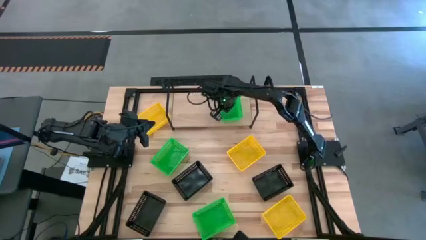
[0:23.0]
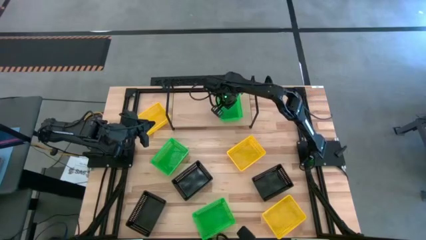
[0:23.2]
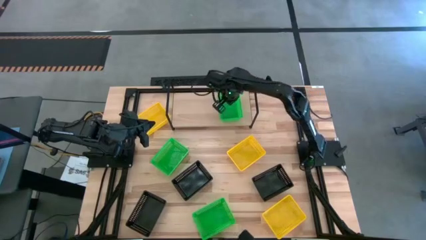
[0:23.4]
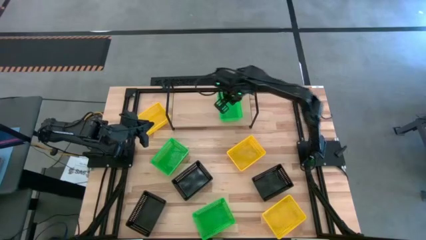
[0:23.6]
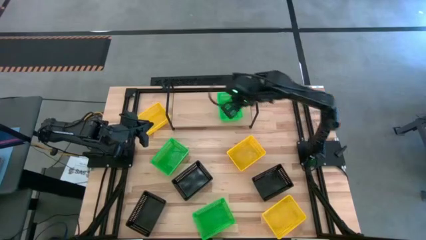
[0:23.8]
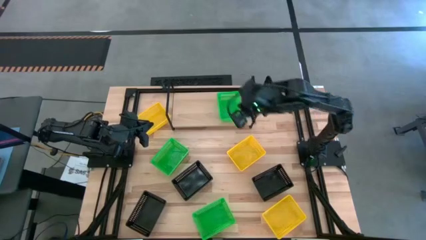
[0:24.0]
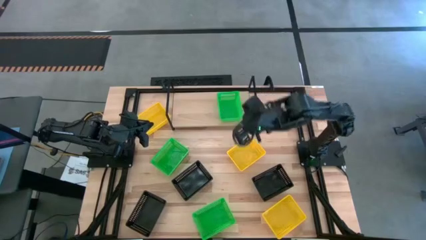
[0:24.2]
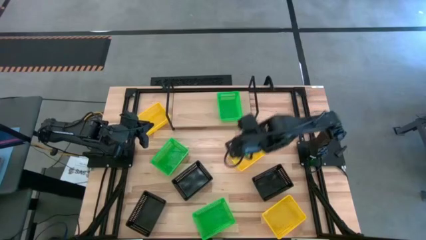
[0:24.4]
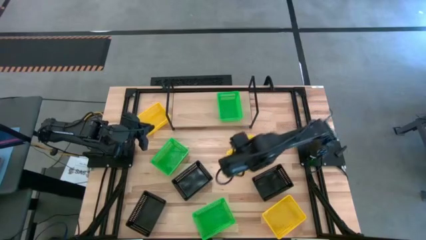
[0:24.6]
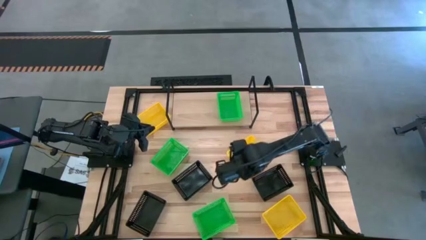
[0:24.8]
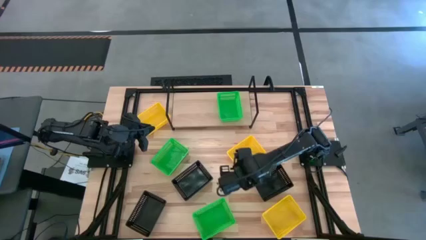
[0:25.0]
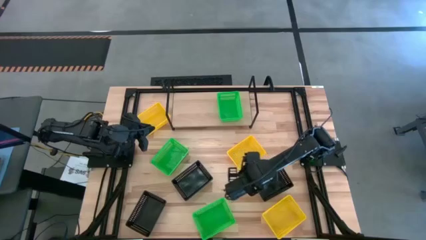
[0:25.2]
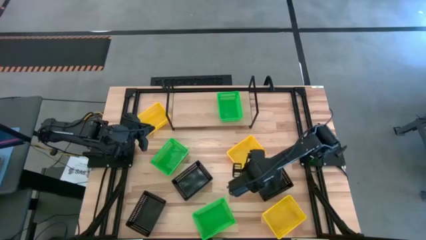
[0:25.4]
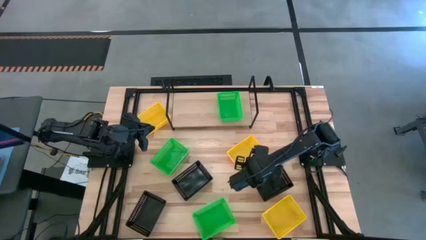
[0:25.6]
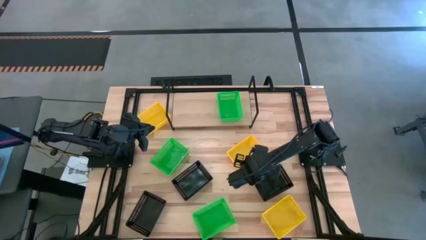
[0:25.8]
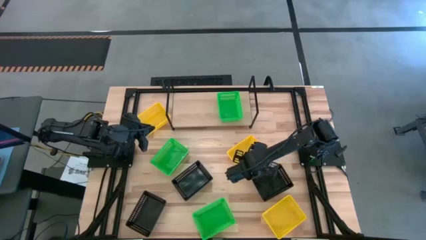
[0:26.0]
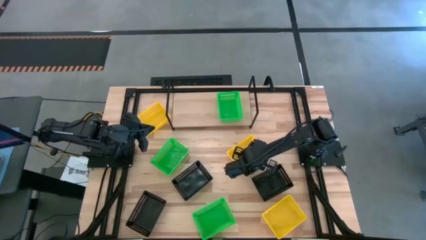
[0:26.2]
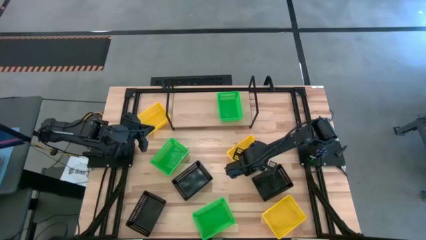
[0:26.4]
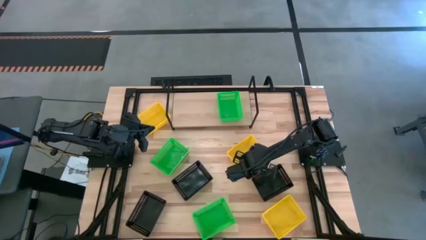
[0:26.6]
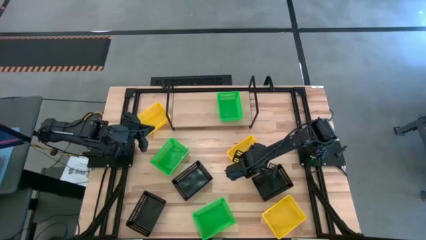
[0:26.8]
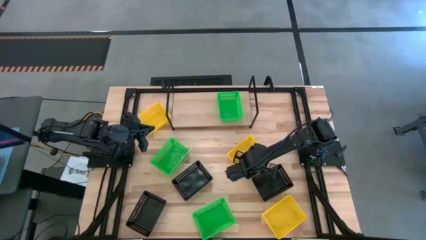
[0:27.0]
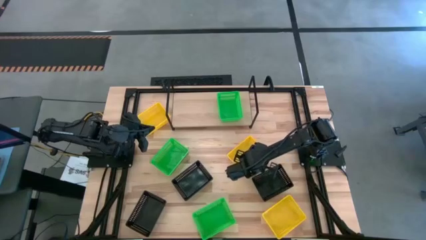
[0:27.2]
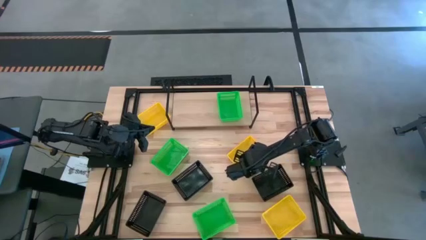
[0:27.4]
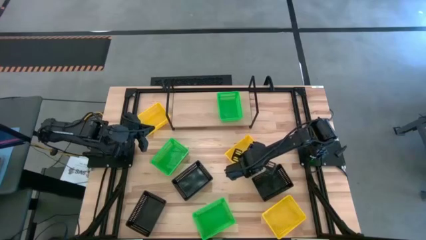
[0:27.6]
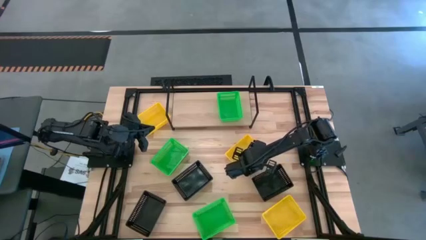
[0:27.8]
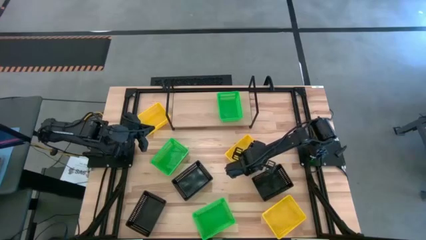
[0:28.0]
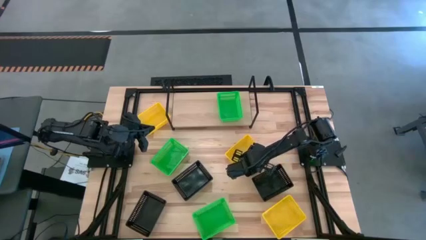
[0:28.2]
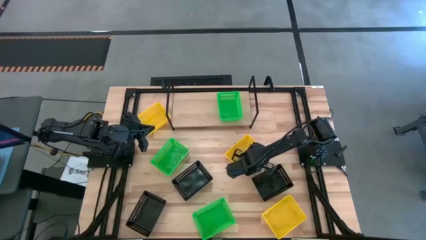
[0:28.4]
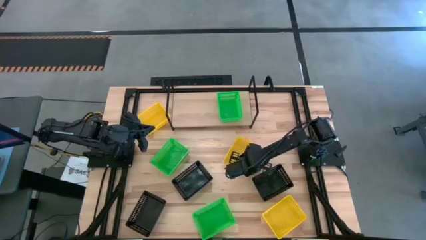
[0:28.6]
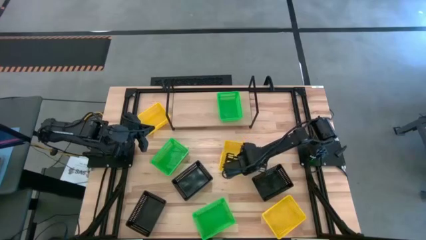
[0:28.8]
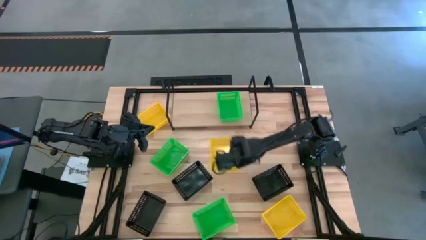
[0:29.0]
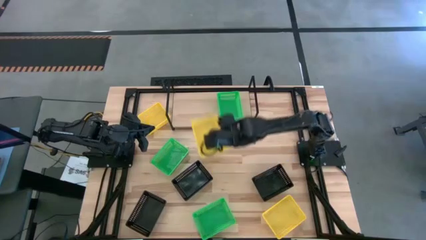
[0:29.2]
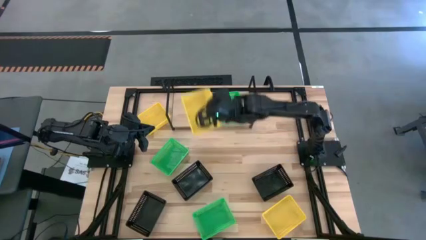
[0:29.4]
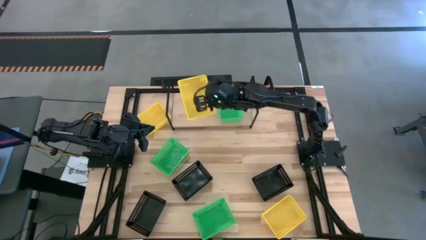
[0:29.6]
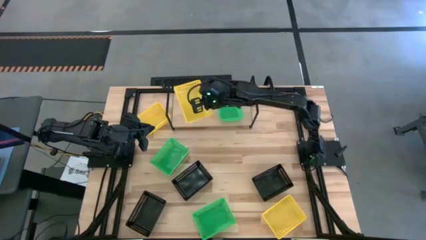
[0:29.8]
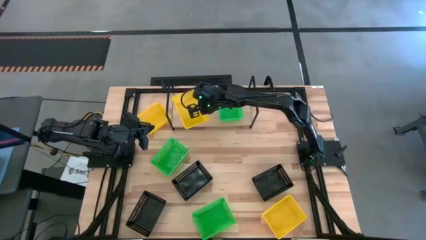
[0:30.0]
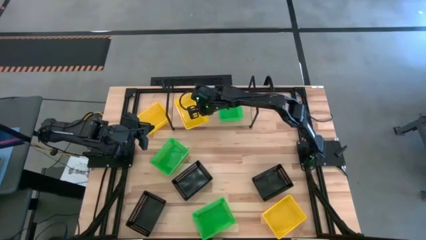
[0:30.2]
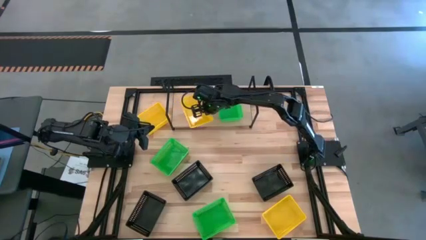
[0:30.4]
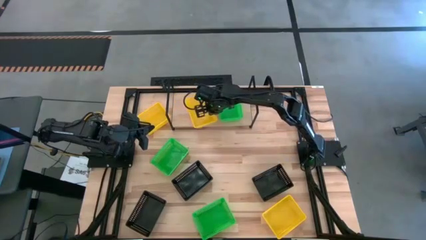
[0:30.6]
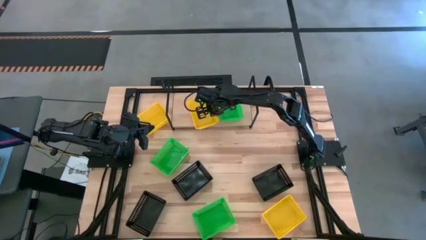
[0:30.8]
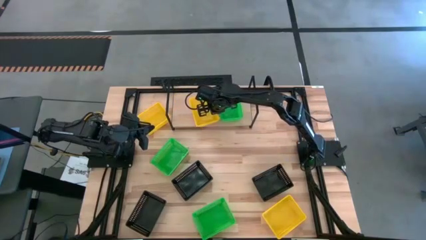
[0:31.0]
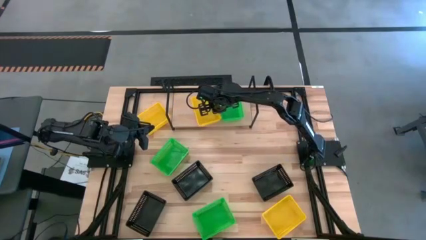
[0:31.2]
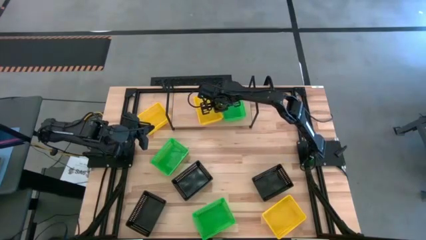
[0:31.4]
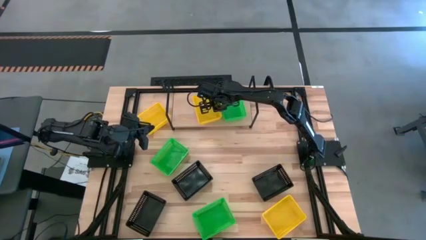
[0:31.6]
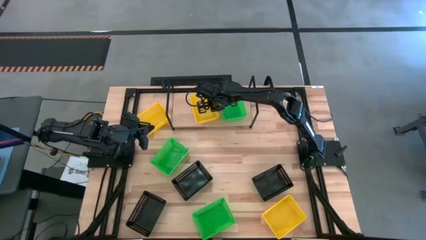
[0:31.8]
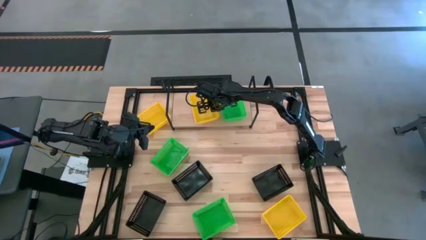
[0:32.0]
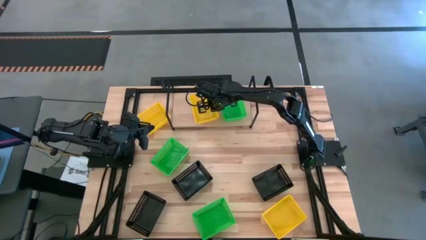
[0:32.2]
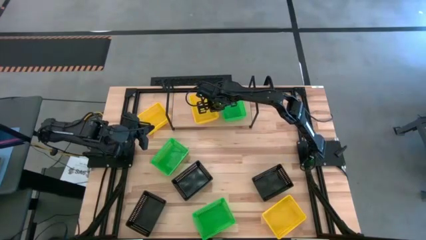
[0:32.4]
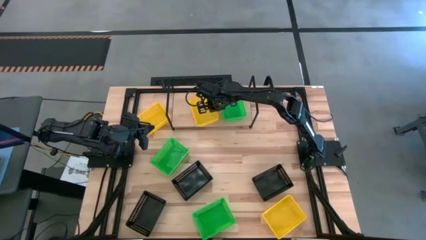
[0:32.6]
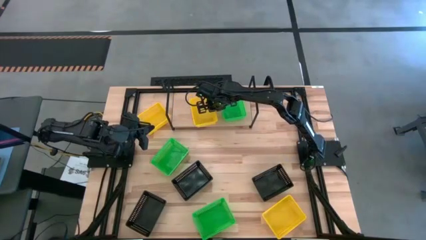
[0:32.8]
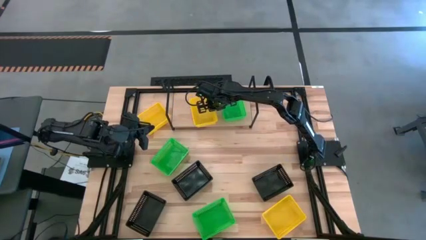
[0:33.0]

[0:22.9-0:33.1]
Task: Stack baskets on shelf by color
Put the middle yellow bin on the shelf

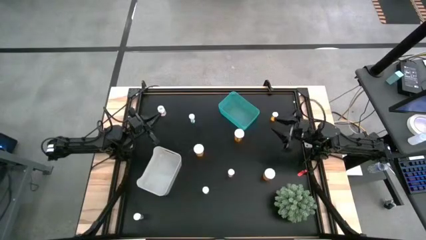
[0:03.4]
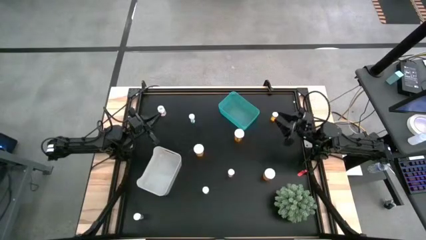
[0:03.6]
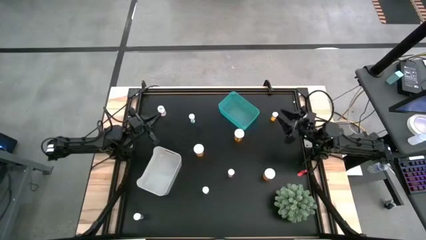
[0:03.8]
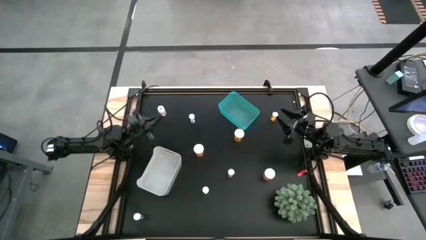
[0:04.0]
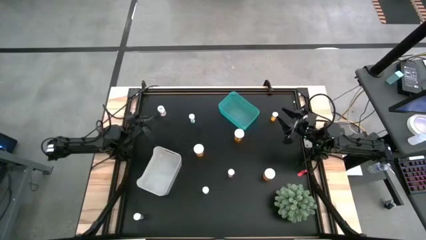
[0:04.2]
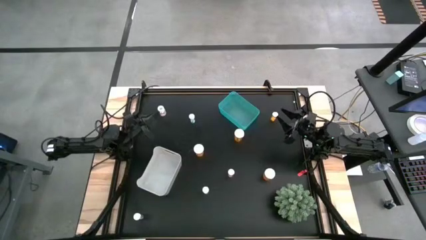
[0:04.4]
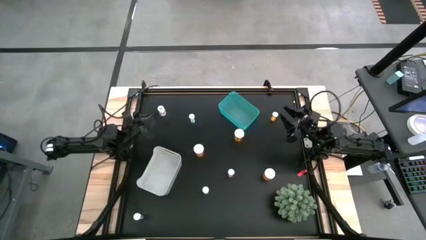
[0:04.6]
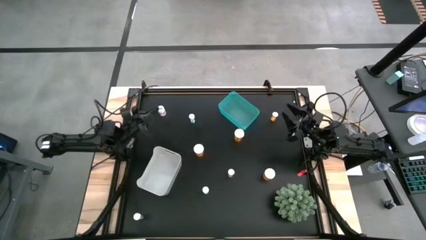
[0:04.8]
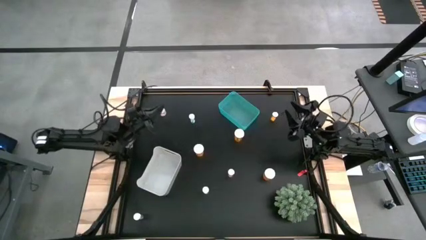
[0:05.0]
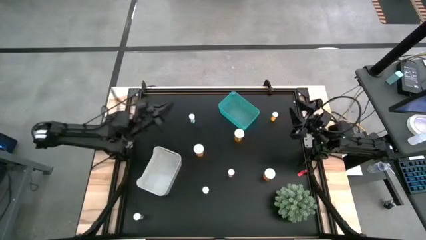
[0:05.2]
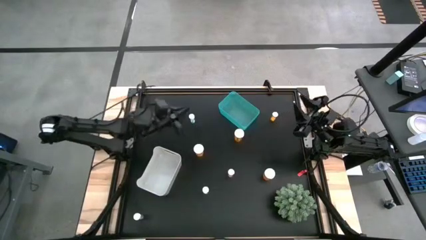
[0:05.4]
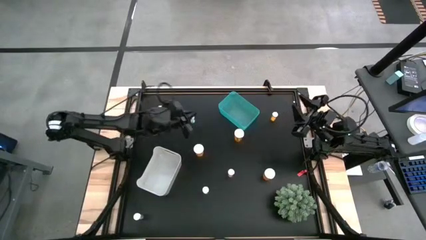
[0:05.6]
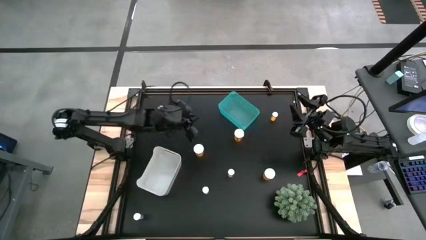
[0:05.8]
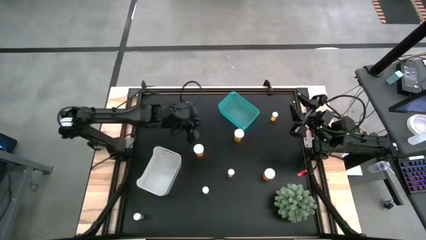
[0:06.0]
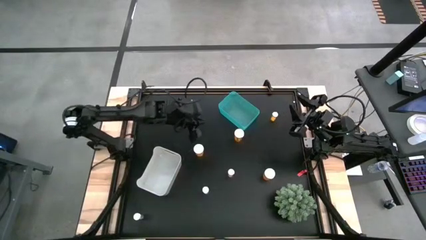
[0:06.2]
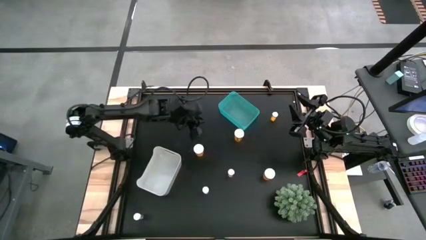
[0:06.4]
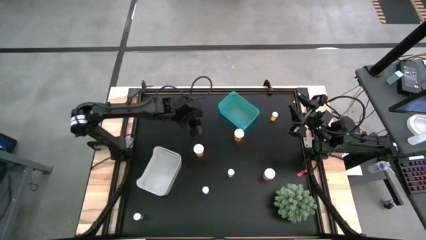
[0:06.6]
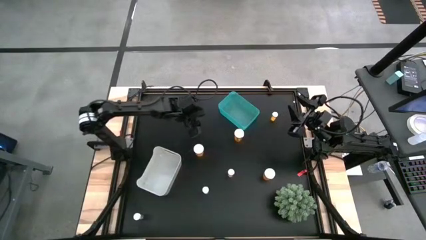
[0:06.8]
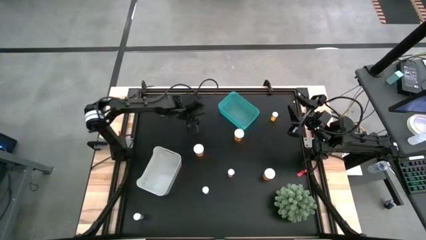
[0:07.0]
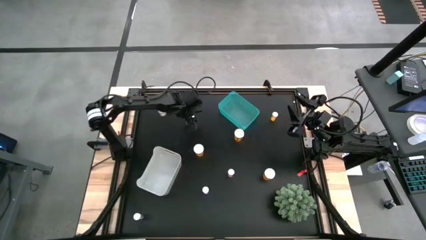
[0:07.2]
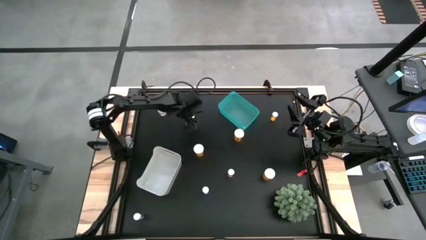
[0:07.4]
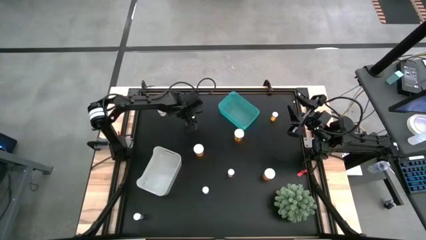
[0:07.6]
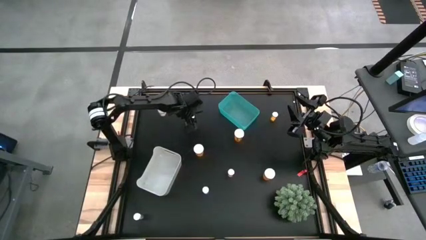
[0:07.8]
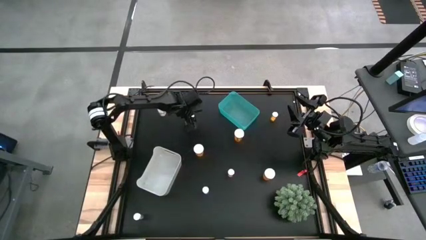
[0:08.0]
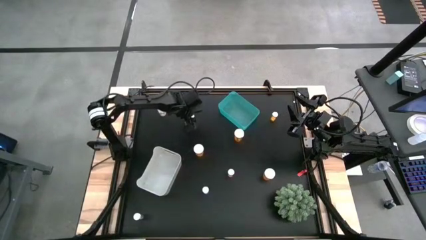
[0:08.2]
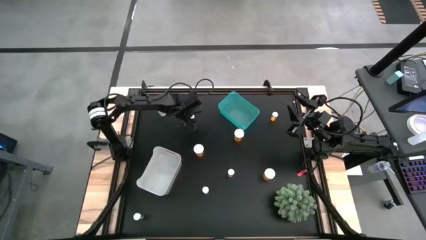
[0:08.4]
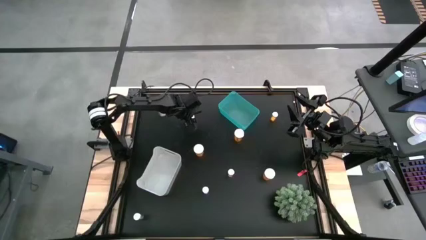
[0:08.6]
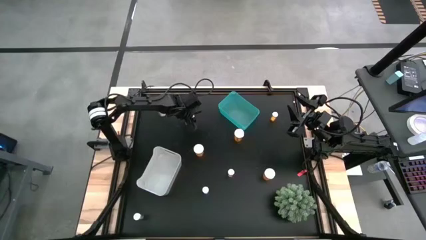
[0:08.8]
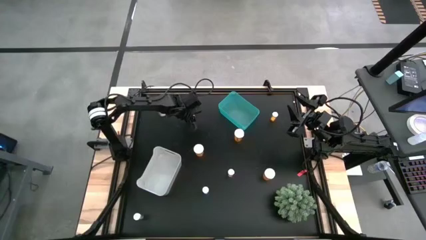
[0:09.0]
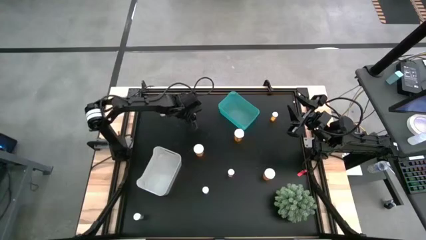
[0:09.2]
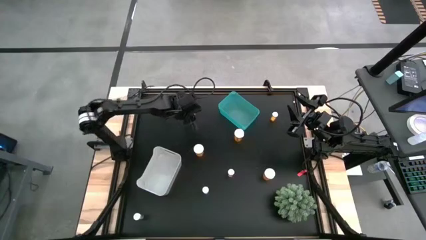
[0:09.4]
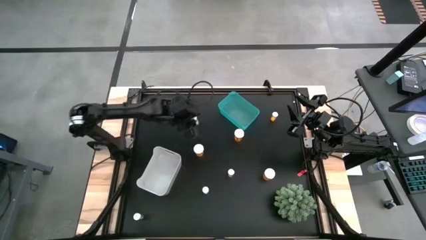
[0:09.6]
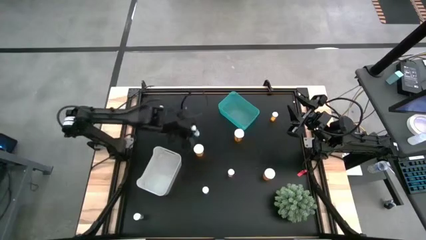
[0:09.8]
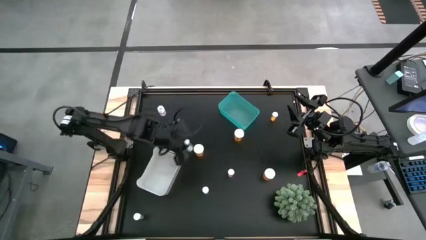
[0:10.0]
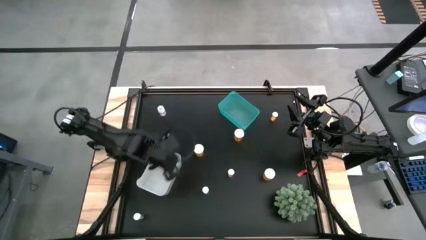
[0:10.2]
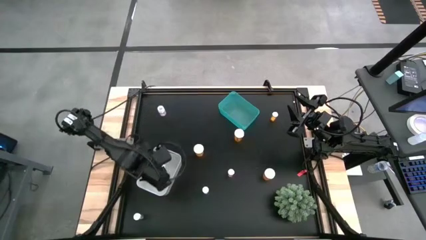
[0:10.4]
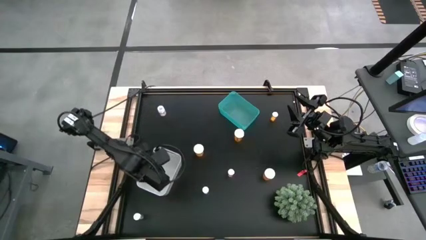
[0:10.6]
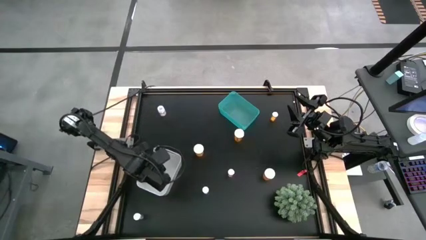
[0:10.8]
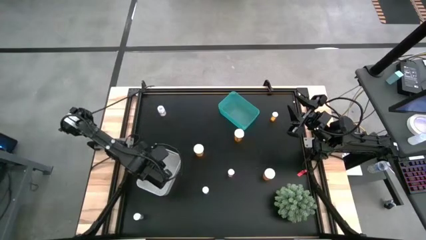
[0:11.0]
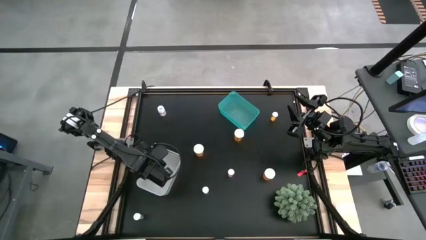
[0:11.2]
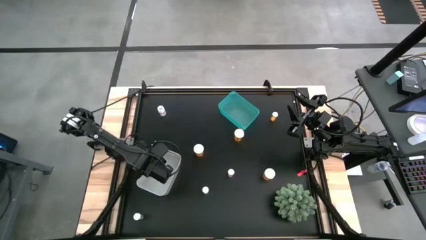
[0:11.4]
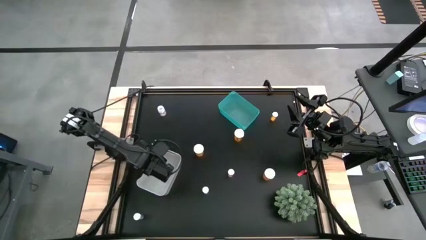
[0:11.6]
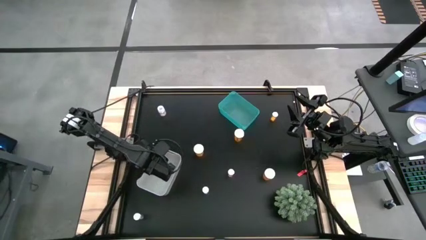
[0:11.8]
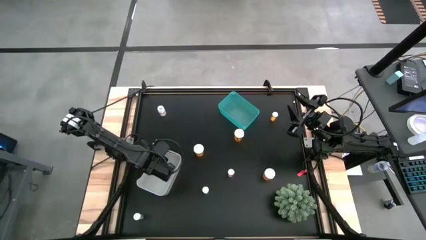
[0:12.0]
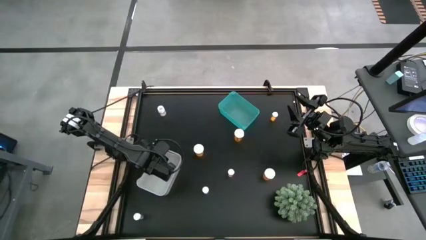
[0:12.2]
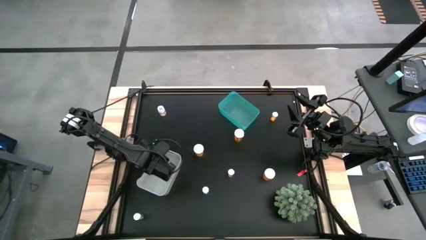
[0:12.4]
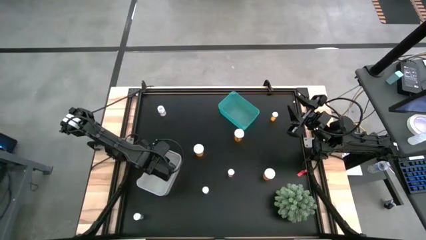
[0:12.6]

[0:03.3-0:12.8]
Task: Pick and place medicine bottles into bin by pill shape (circle, oval)
Put the top blue tablet bottle into the gray bin
